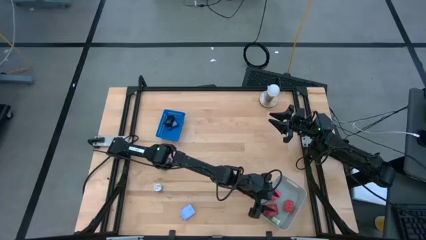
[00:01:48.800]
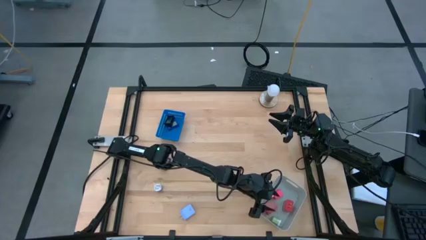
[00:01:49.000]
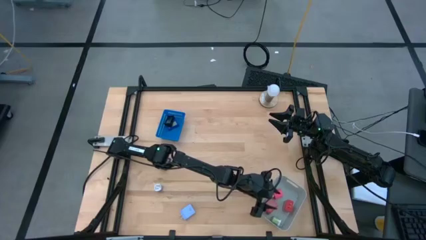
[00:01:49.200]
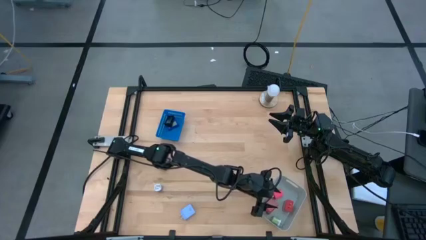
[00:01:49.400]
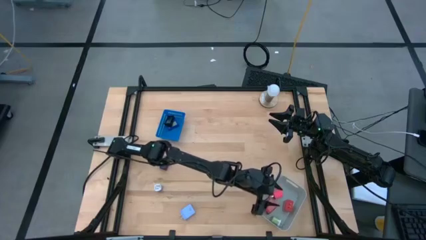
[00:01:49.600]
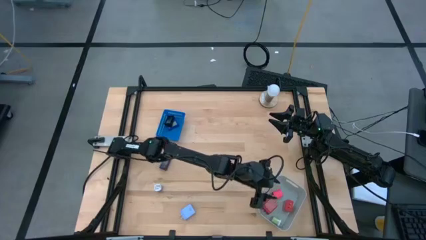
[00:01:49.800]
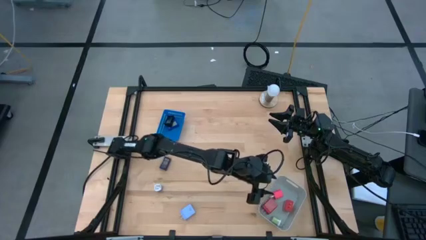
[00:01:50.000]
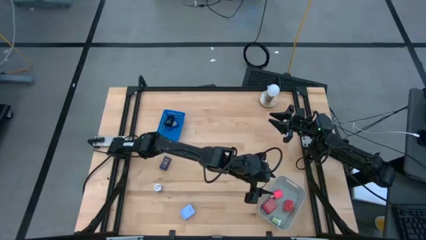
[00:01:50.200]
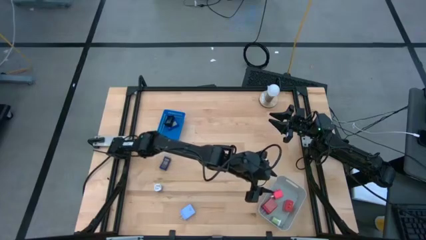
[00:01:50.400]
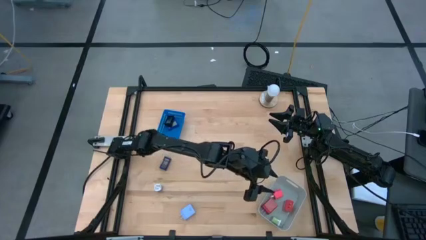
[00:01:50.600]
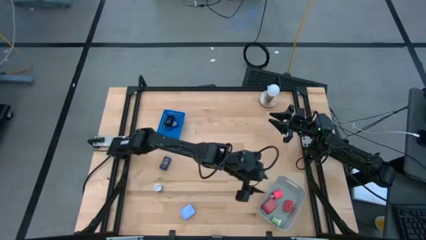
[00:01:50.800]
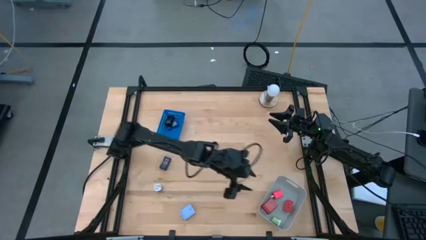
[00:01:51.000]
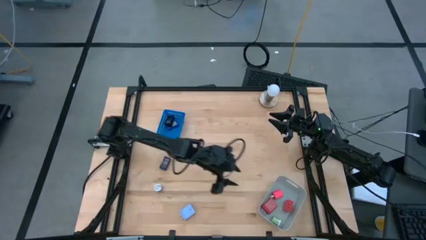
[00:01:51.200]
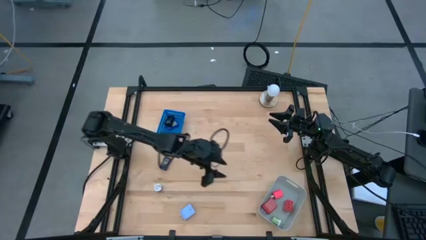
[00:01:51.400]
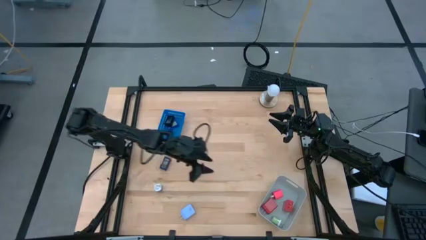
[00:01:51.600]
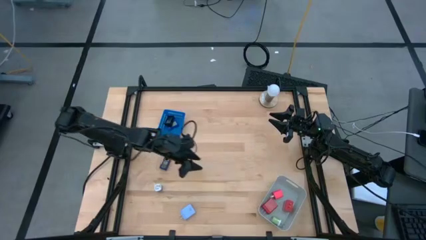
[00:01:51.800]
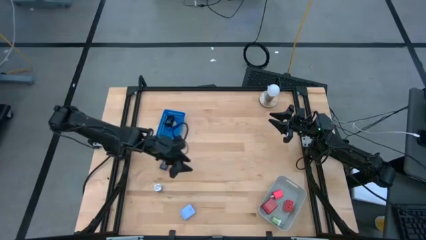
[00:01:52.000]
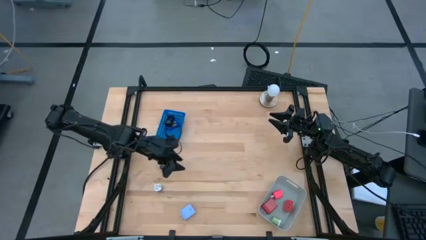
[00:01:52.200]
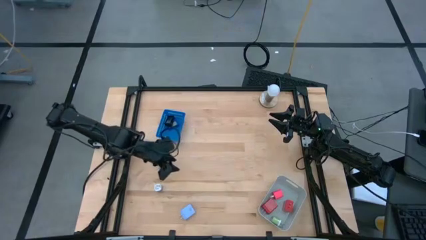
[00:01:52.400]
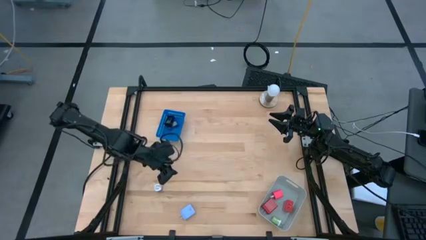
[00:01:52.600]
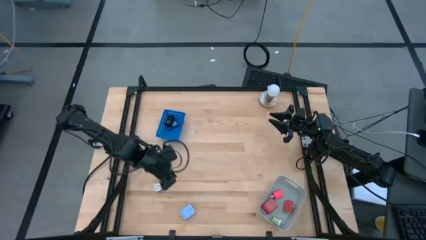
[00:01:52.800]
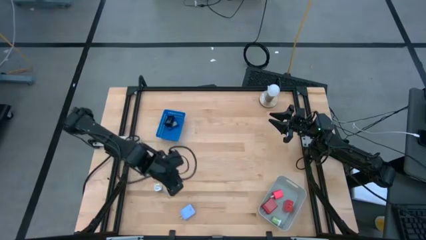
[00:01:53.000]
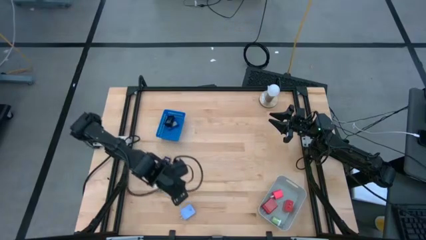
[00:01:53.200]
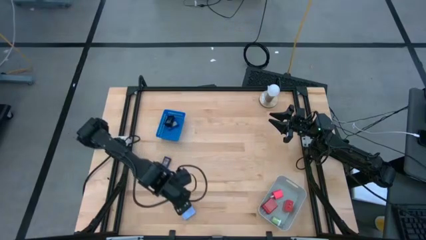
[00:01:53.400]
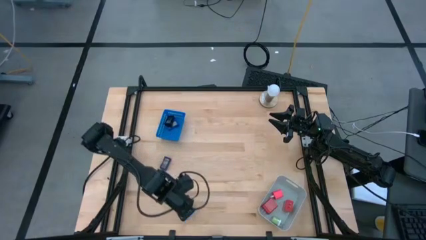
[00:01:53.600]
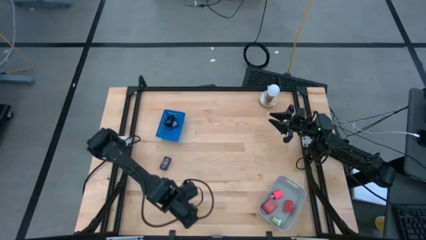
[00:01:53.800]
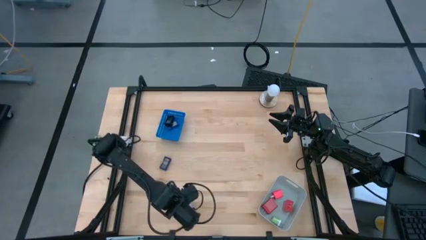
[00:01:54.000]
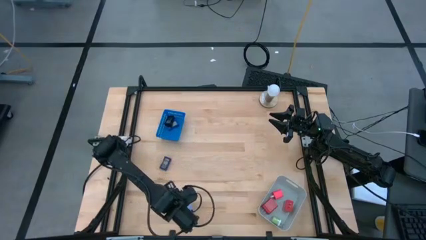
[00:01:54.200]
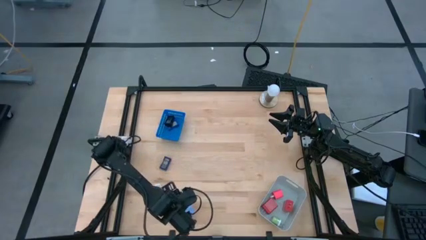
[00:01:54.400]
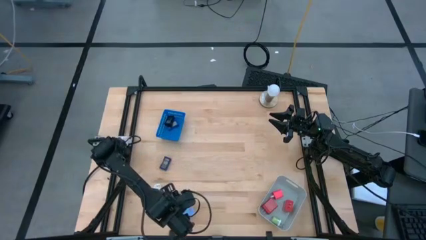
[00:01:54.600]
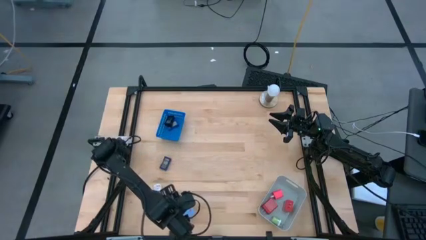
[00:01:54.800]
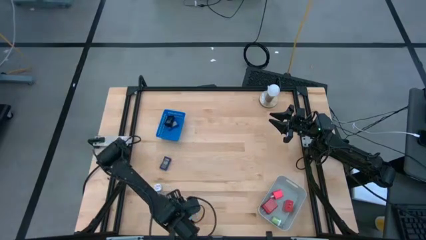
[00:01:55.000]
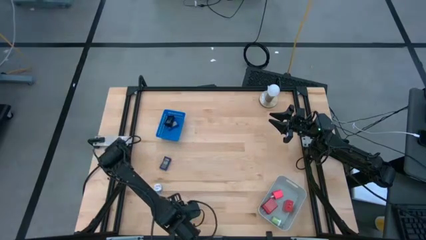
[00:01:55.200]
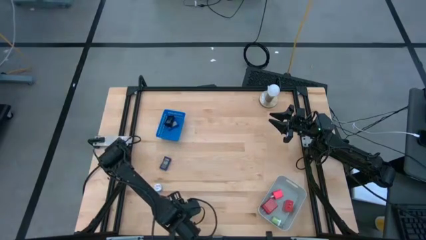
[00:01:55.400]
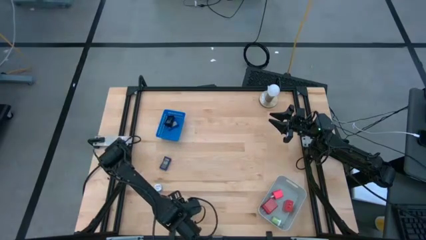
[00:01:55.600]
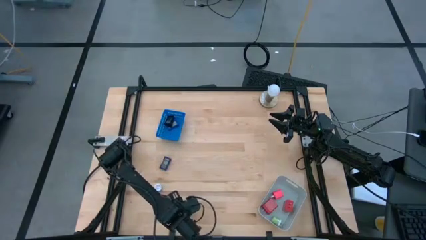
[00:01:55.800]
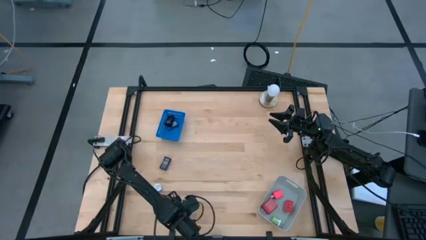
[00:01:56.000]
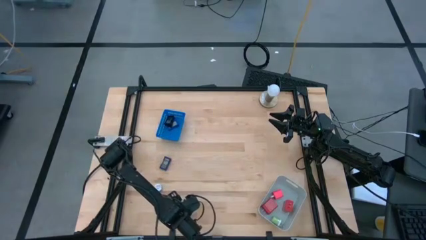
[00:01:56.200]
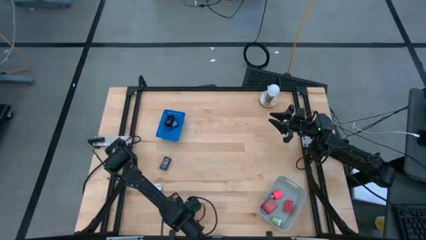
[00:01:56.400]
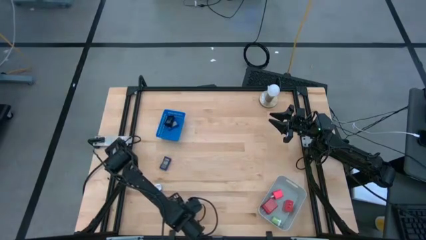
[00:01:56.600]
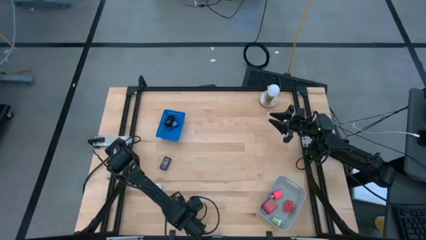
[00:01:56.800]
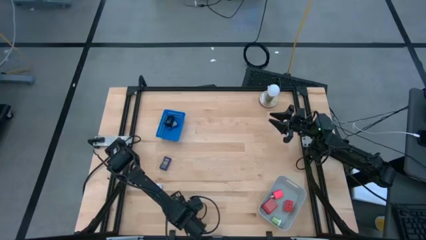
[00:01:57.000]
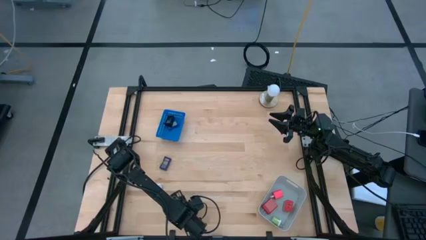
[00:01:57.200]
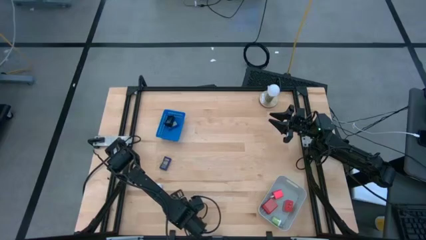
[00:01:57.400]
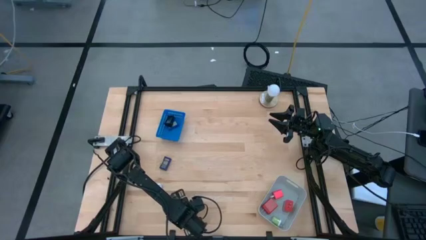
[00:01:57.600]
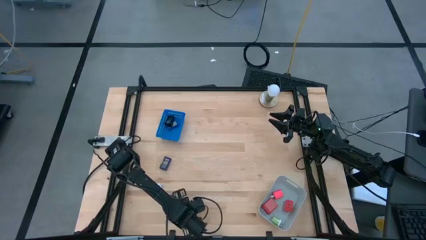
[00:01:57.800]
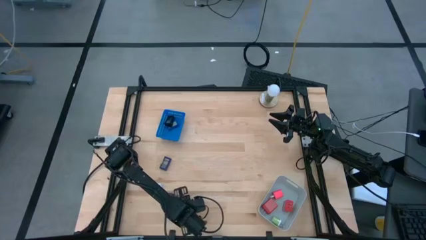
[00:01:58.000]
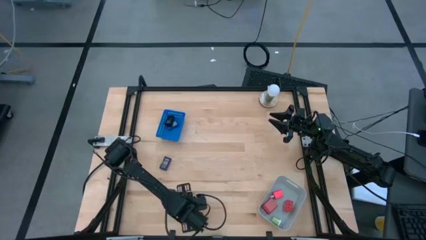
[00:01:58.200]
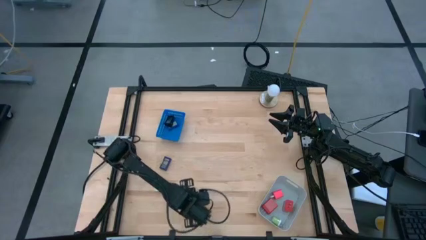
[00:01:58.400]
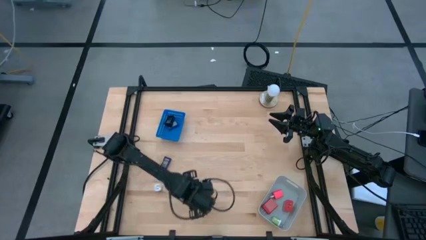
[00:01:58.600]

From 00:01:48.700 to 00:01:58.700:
Task: Pick & Place Office items
Put the blue charger adapter into the white bin
